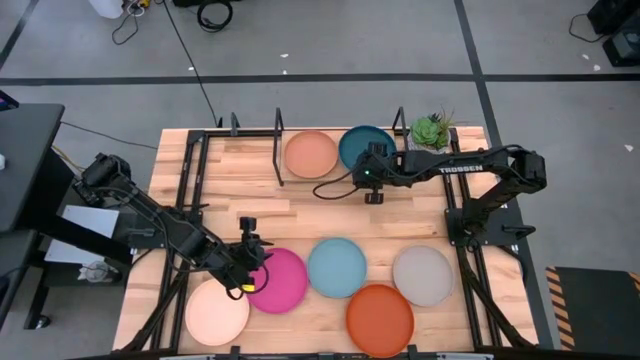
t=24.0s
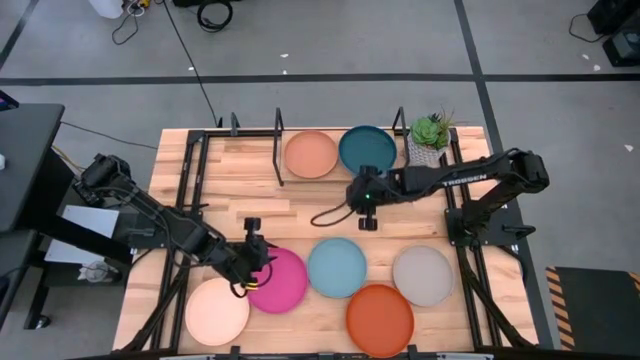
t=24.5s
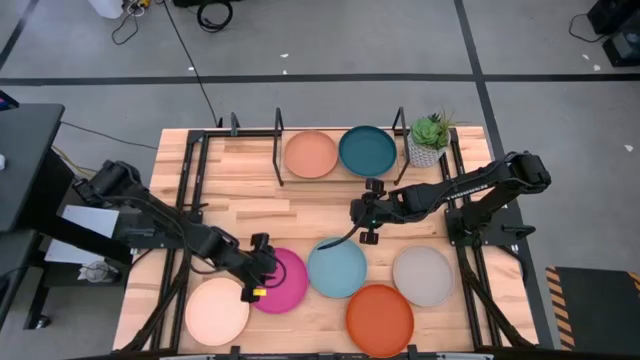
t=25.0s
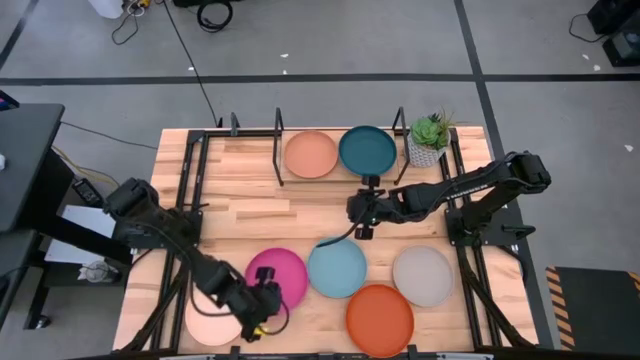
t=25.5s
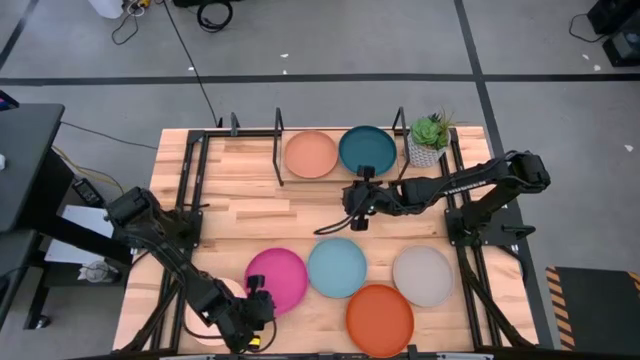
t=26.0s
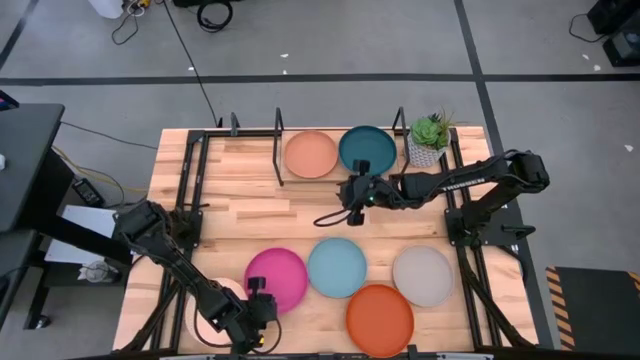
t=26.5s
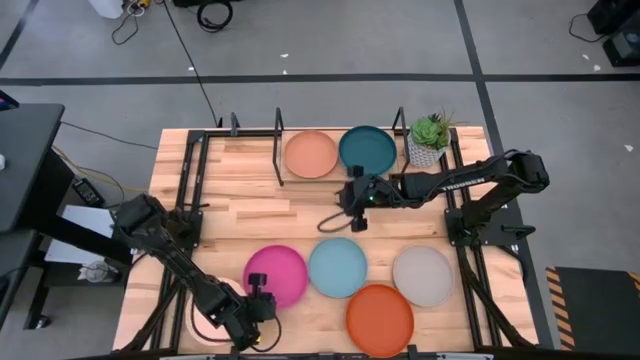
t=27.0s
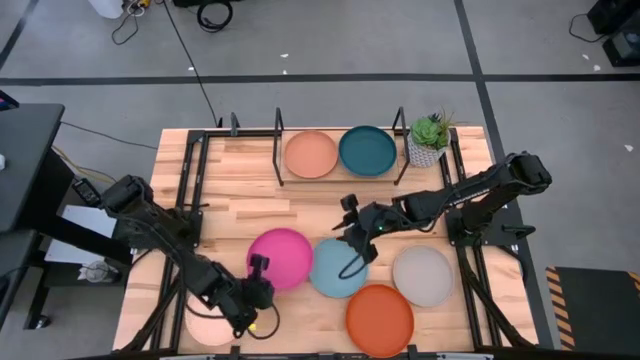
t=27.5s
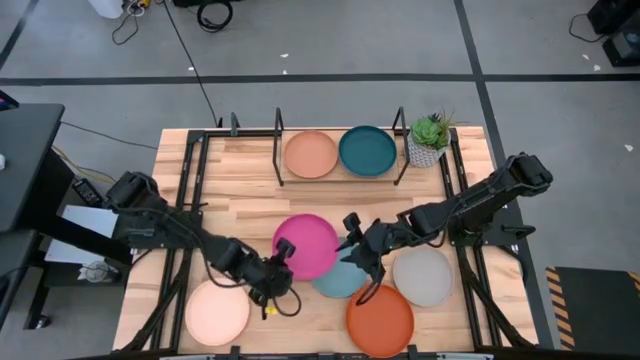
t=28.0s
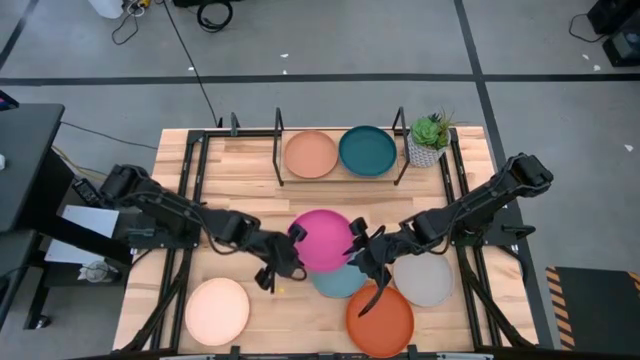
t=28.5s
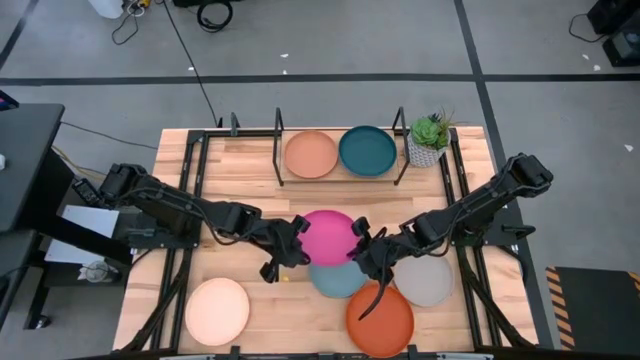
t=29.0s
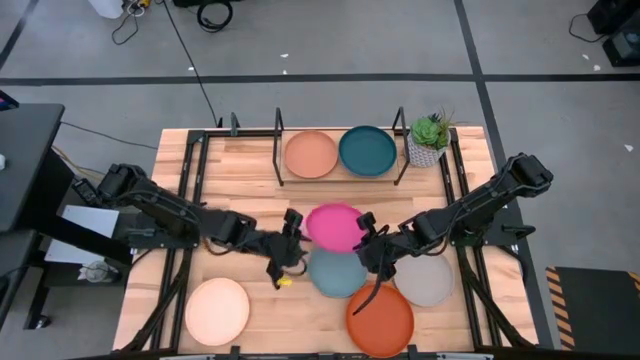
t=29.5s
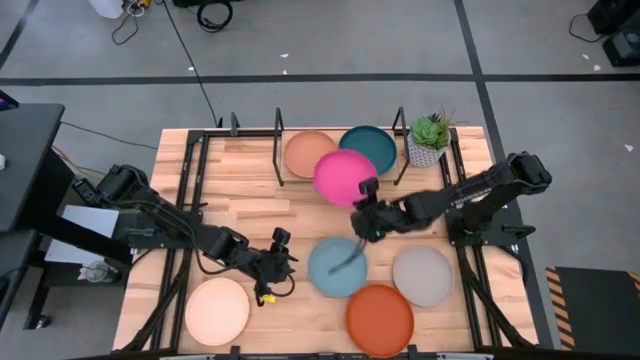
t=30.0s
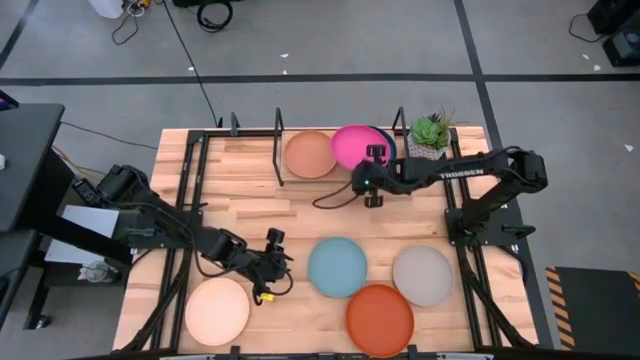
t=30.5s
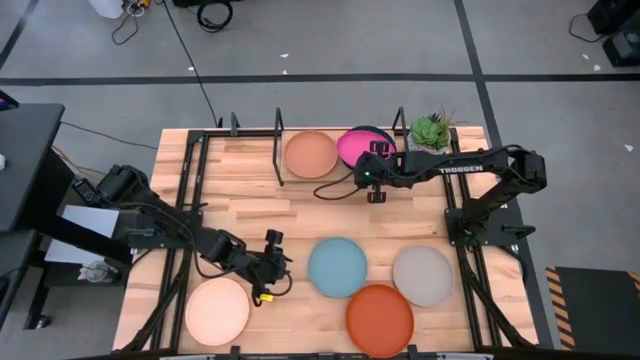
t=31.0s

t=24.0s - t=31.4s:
Task: Place and stack plates onto a shelf
Stack the pink plate on top of the green plate on the shelf

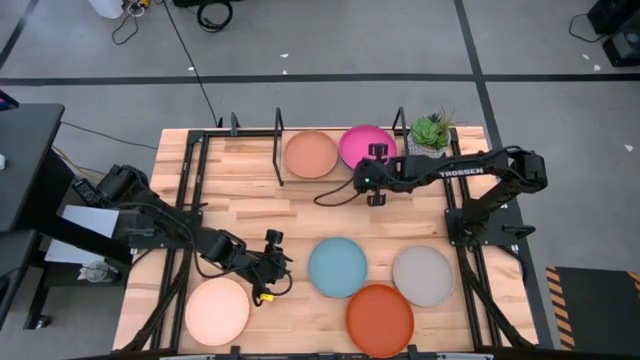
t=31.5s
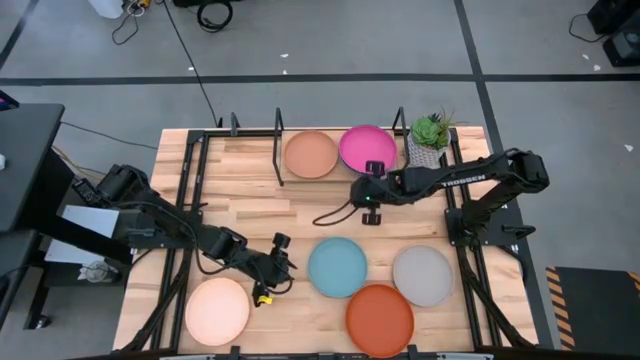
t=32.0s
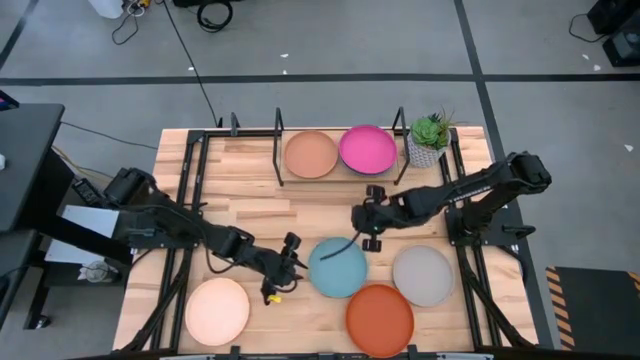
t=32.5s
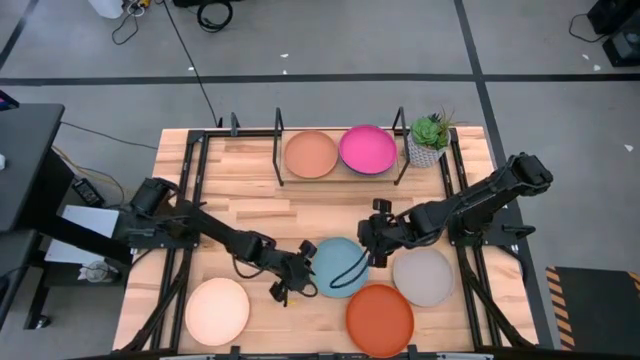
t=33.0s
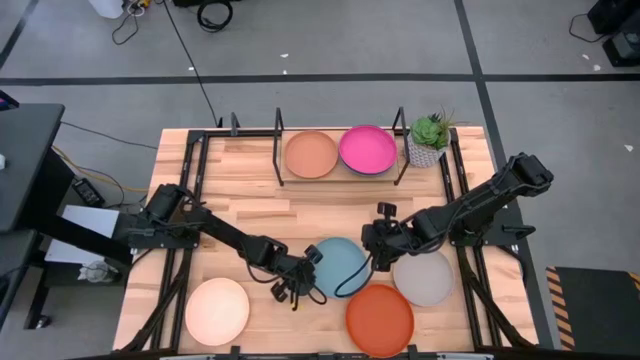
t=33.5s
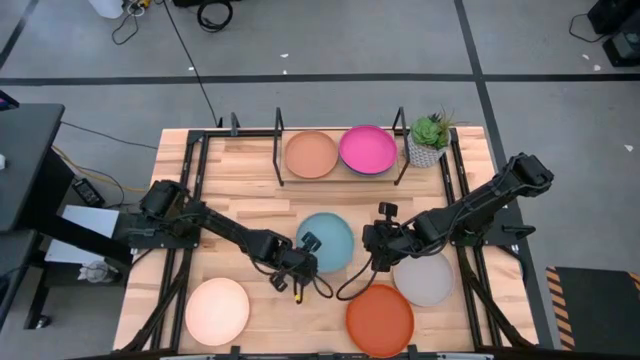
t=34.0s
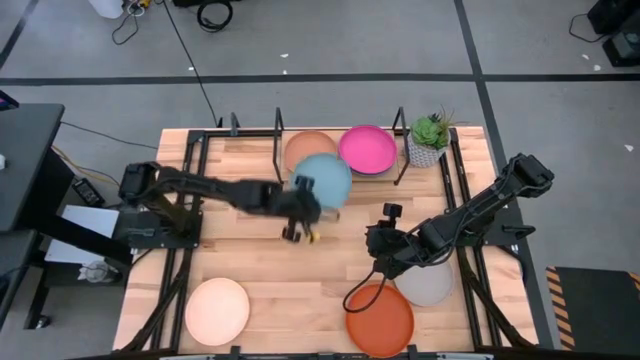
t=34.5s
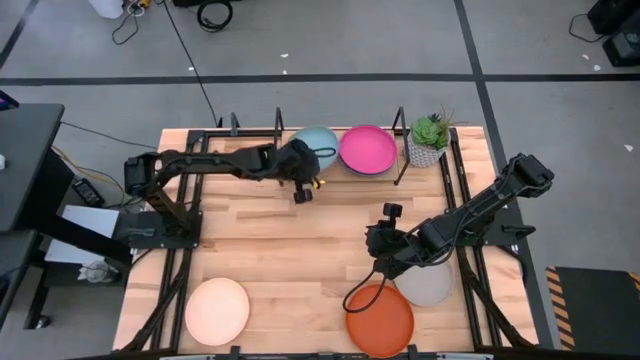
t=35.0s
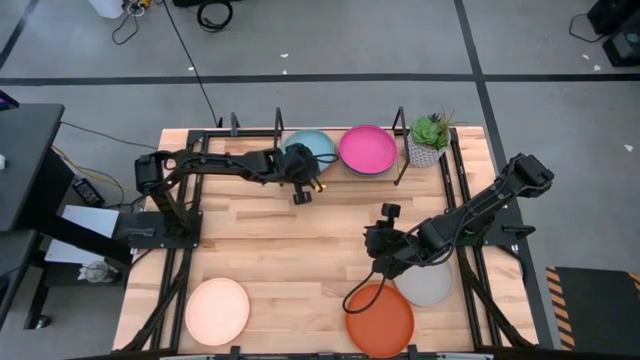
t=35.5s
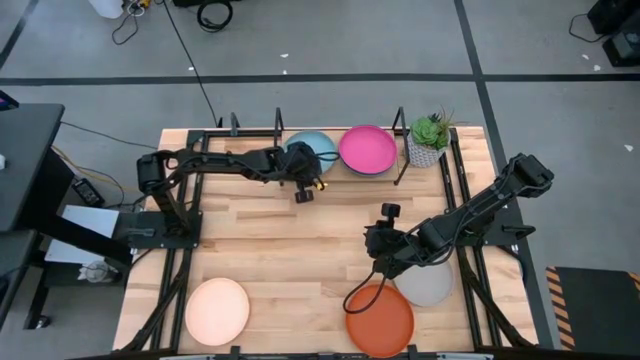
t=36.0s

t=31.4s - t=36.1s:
Stack the blue plate on top of the brown plate on the shelf

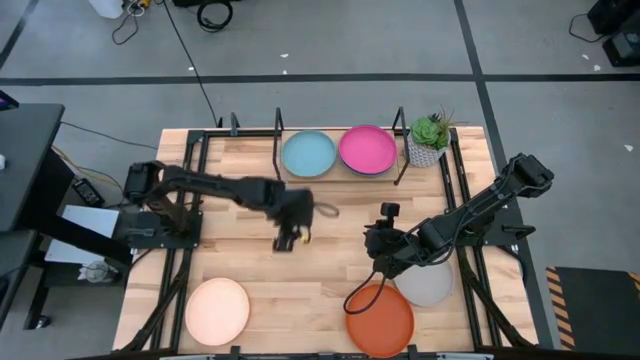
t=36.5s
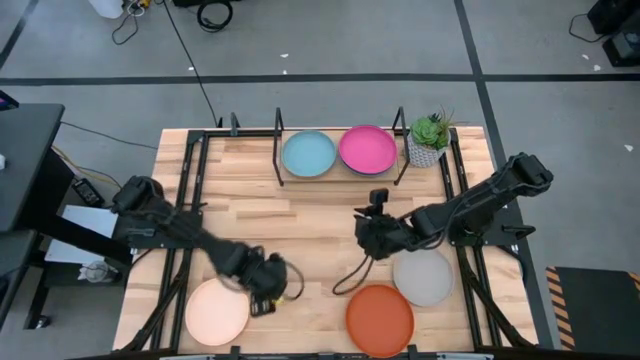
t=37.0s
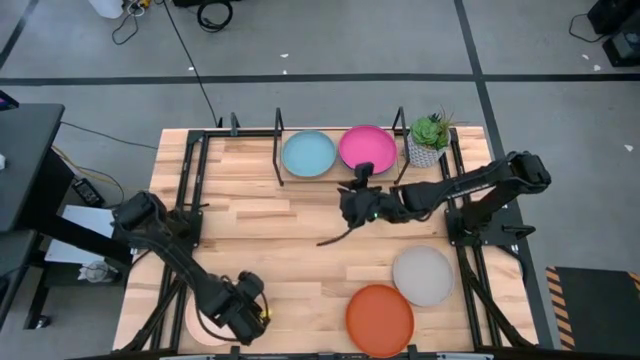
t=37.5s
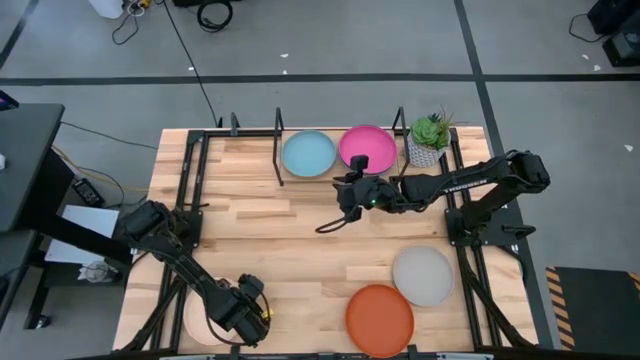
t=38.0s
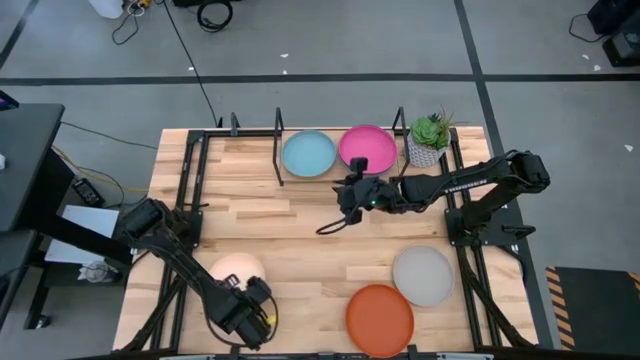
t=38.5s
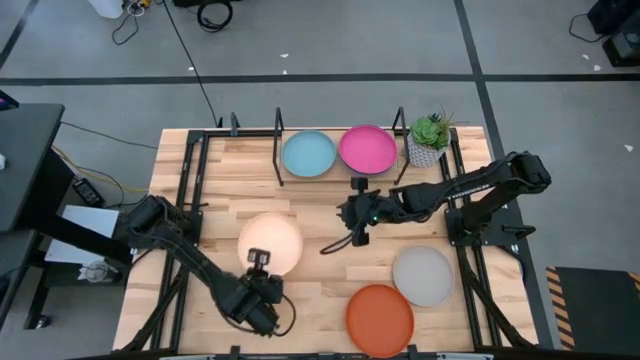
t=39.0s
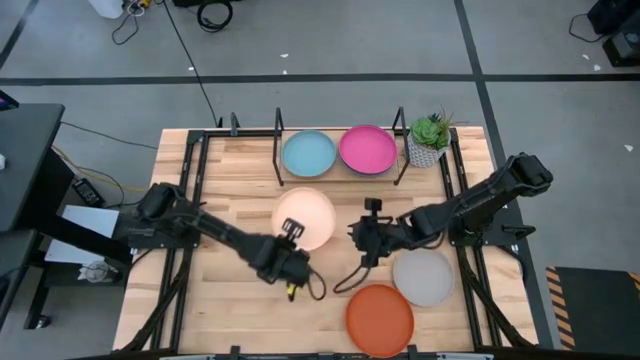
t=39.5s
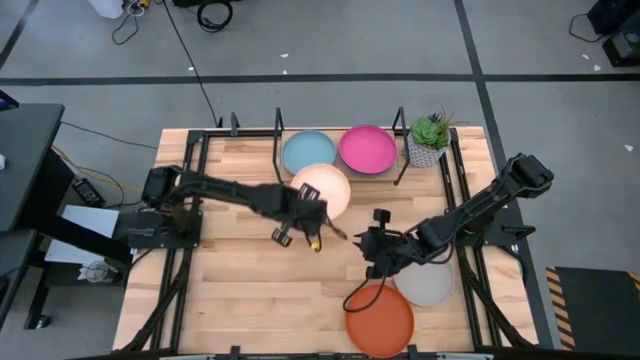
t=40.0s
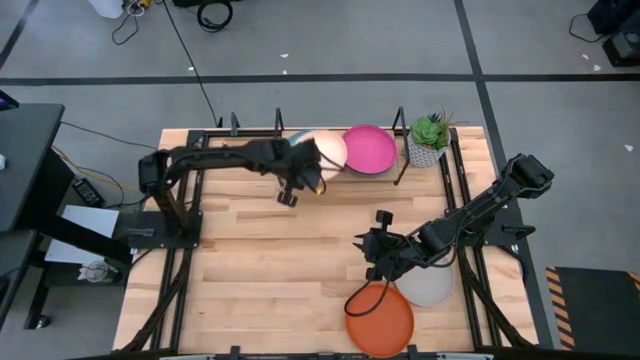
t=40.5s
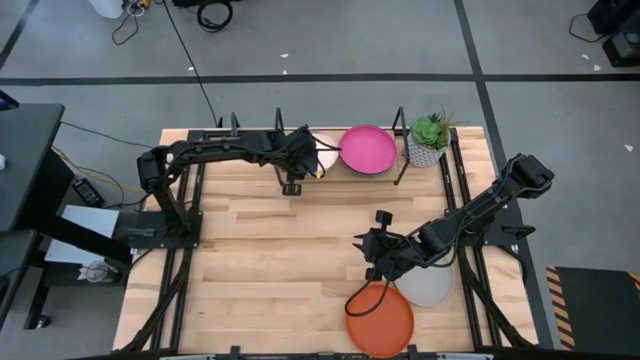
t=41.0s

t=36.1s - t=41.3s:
Stack the white plate on top of the blue plate on the shelf

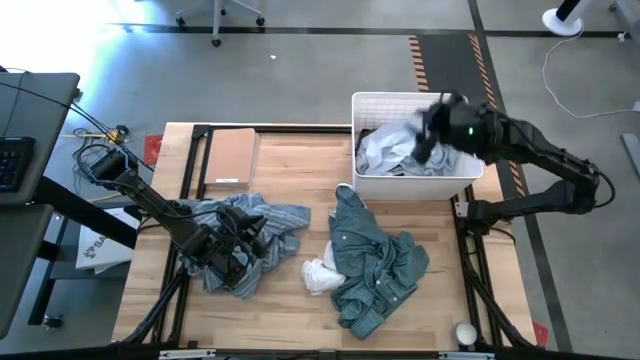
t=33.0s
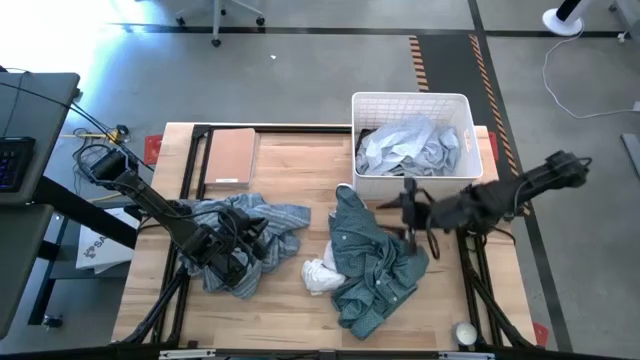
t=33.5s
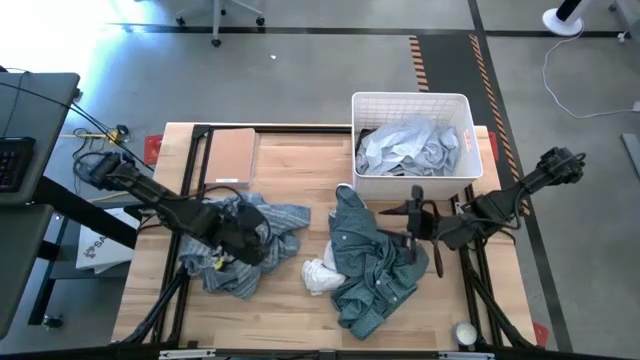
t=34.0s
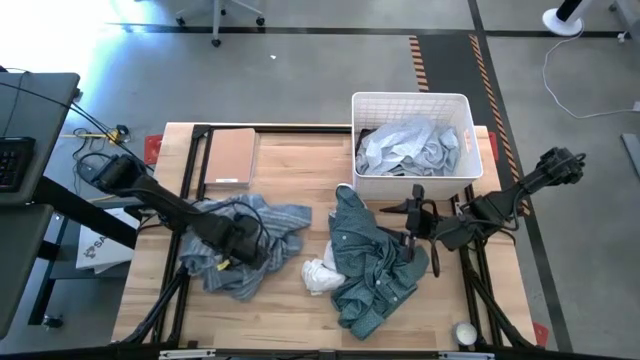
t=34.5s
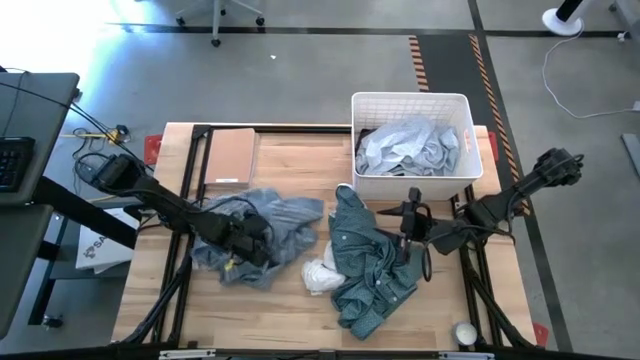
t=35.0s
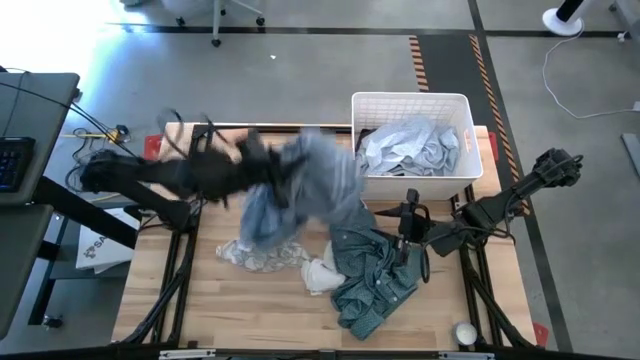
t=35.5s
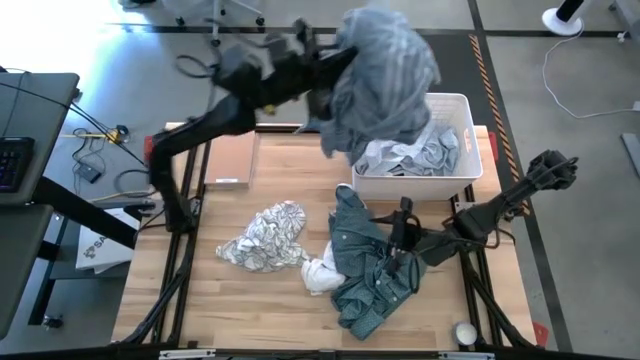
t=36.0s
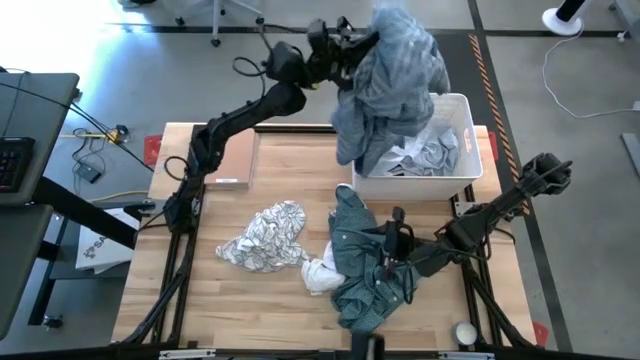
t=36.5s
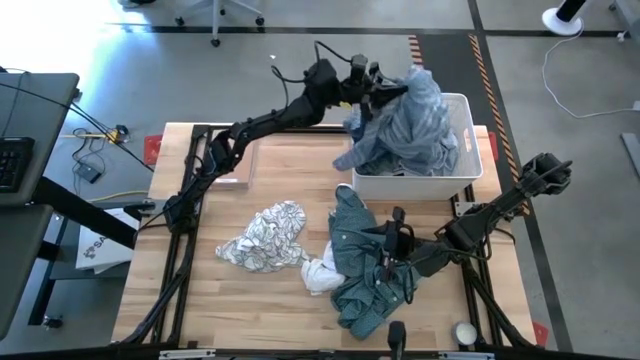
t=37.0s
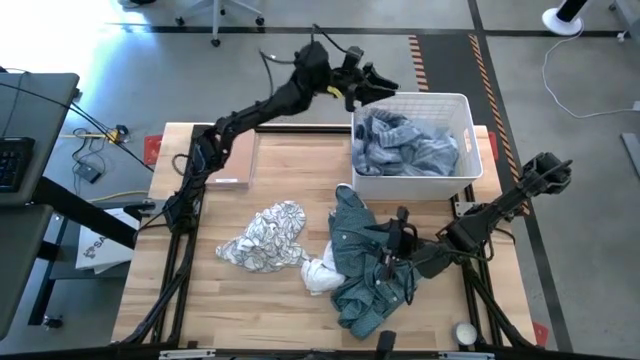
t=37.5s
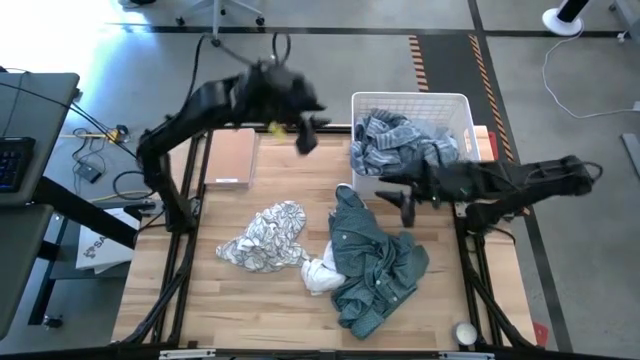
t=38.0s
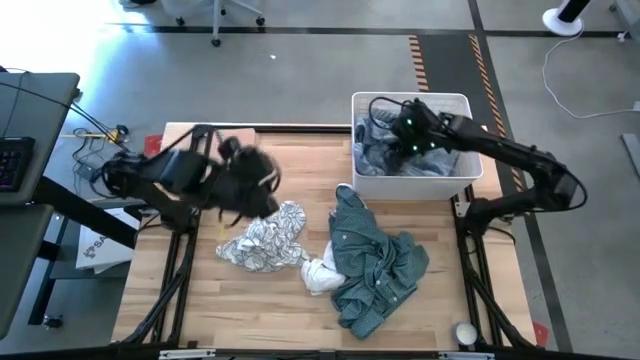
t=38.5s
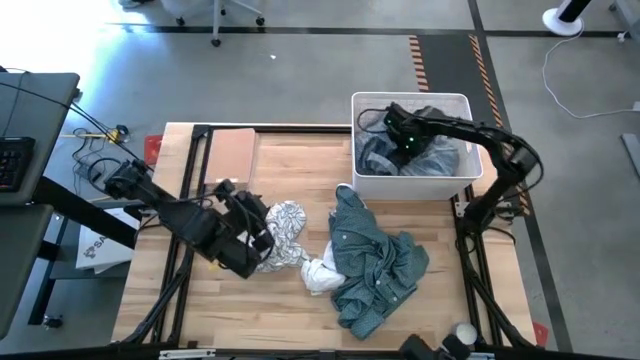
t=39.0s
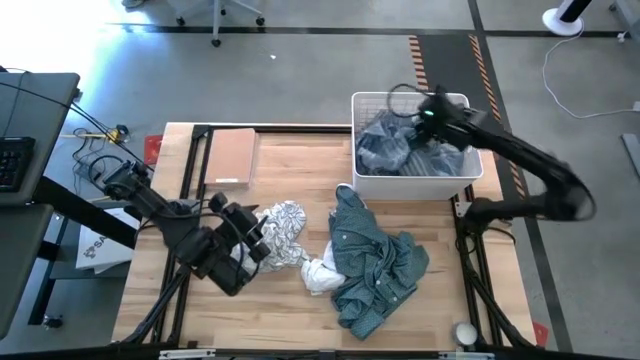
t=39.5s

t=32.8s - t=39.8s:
Task: Sort clothes
Put the blue polo shirt into the white laundry bin
